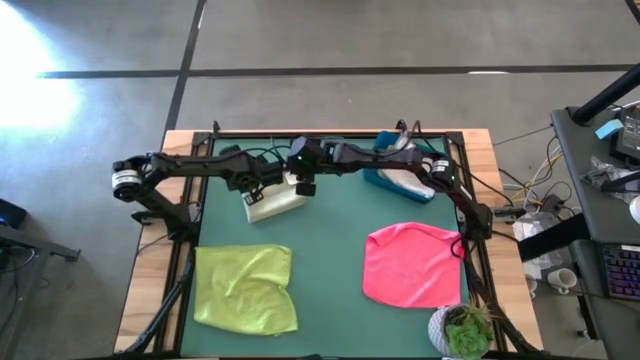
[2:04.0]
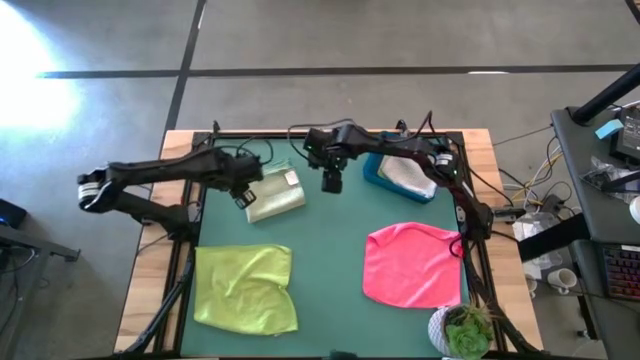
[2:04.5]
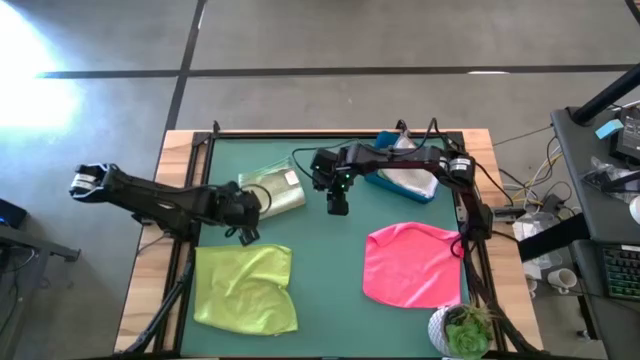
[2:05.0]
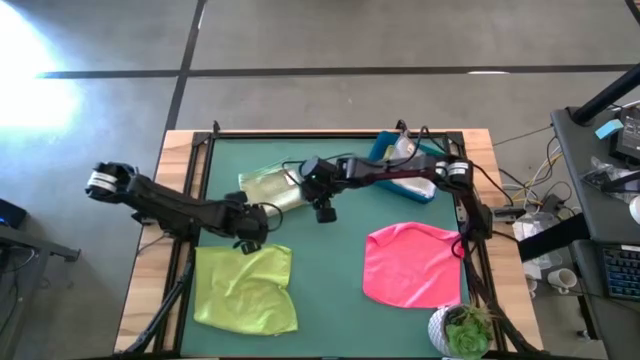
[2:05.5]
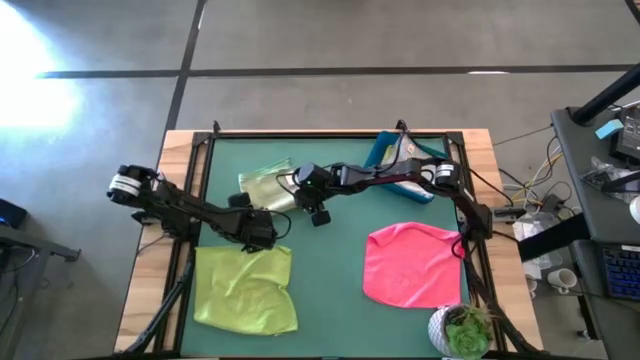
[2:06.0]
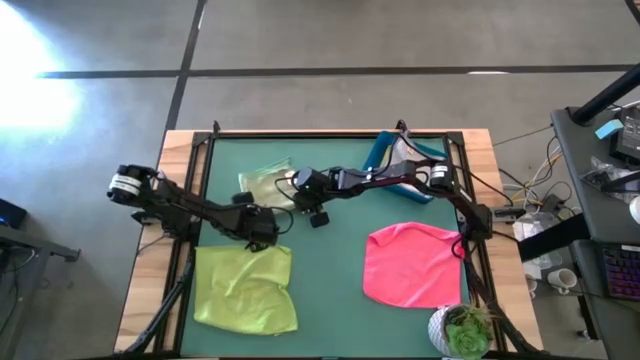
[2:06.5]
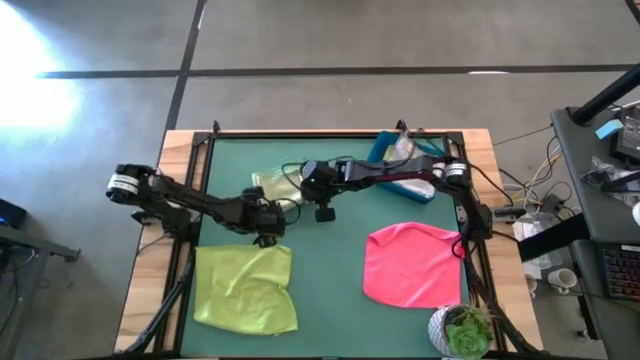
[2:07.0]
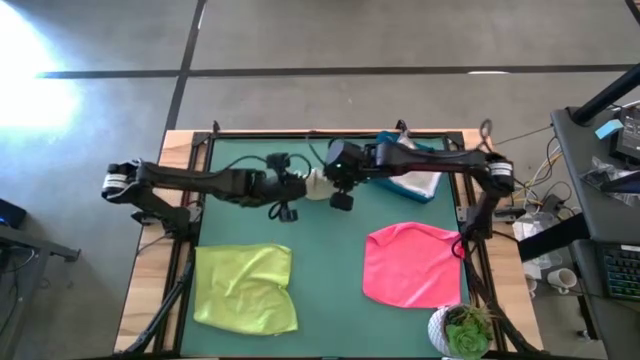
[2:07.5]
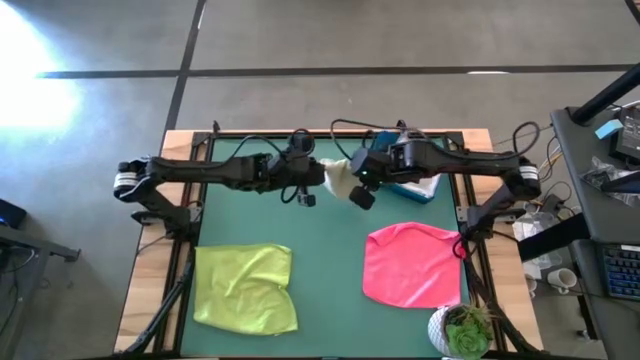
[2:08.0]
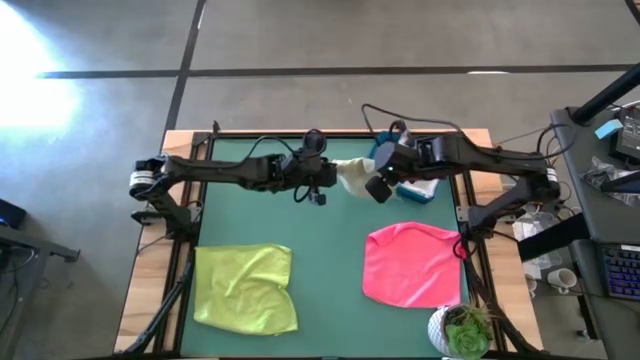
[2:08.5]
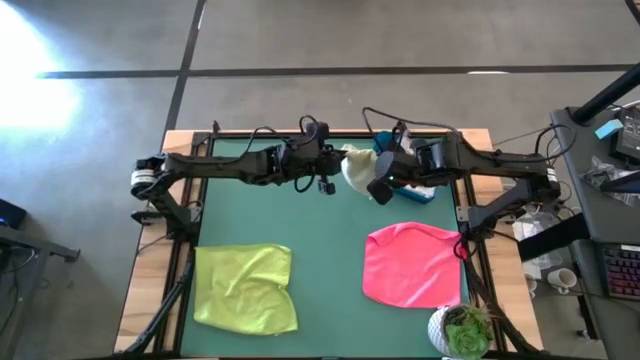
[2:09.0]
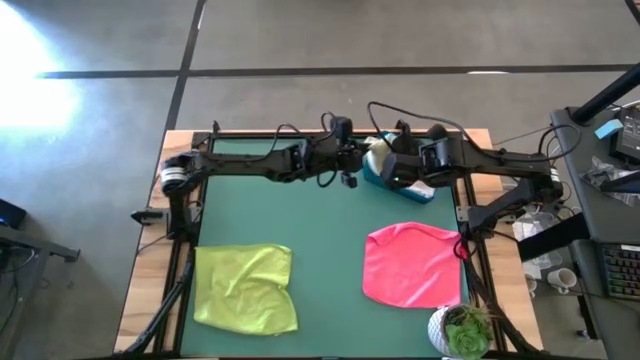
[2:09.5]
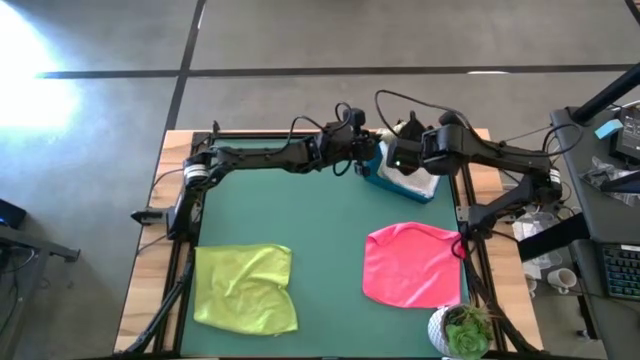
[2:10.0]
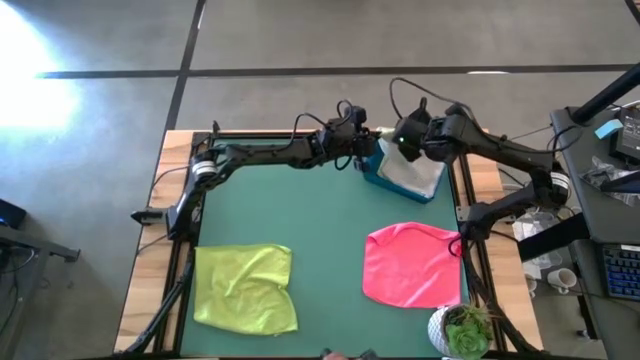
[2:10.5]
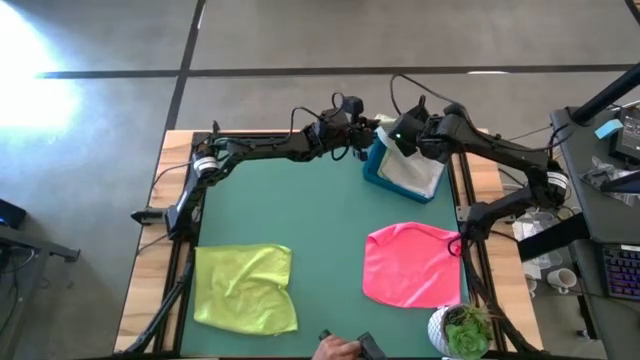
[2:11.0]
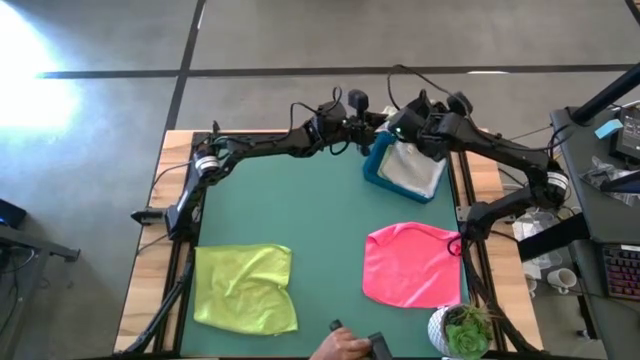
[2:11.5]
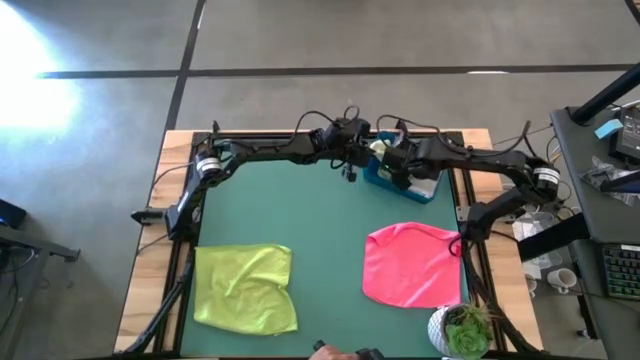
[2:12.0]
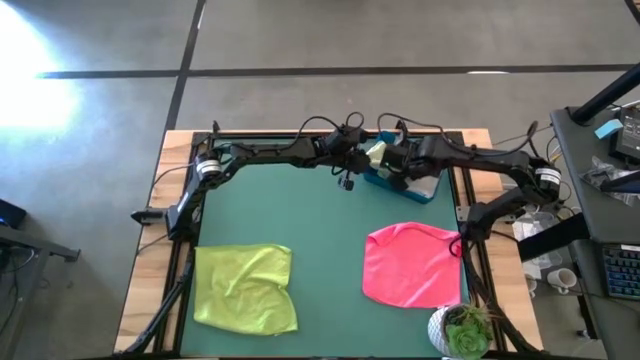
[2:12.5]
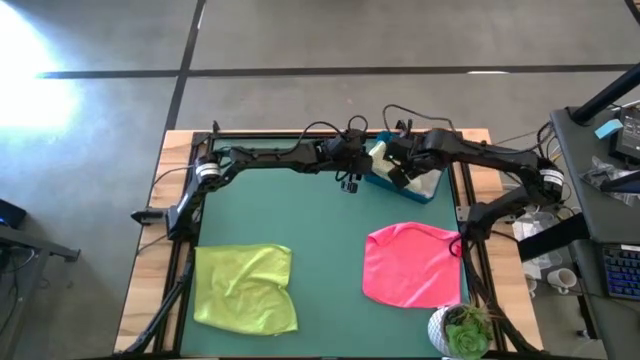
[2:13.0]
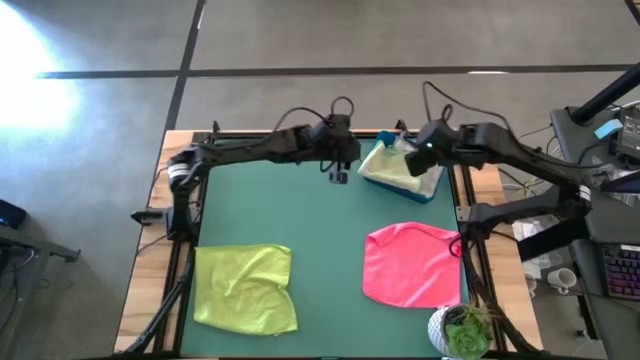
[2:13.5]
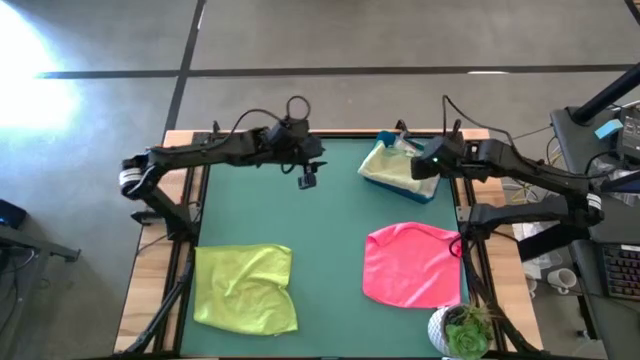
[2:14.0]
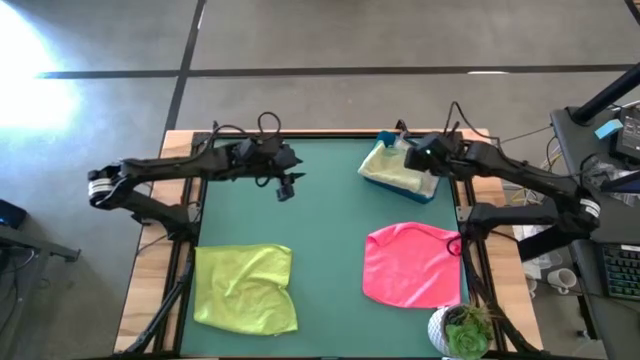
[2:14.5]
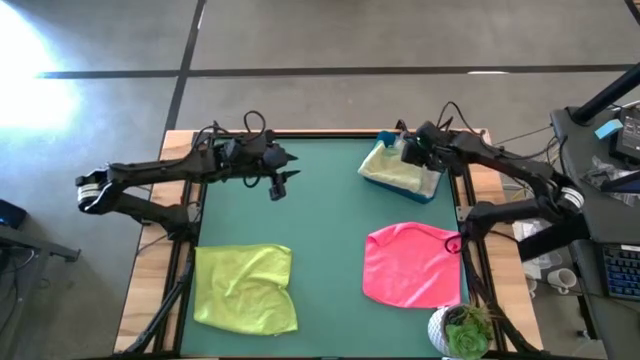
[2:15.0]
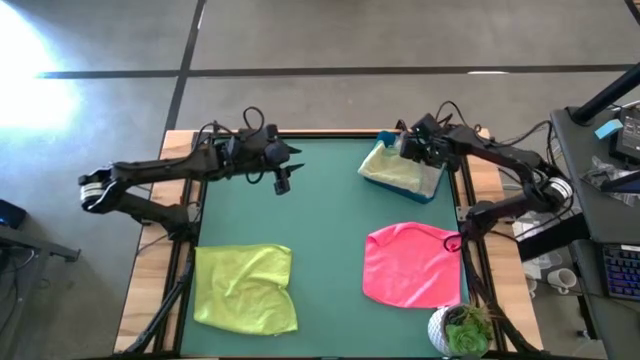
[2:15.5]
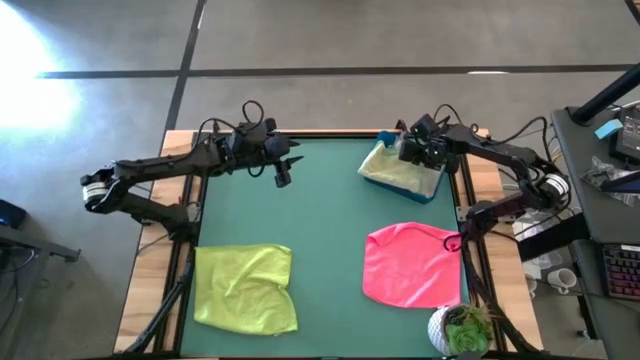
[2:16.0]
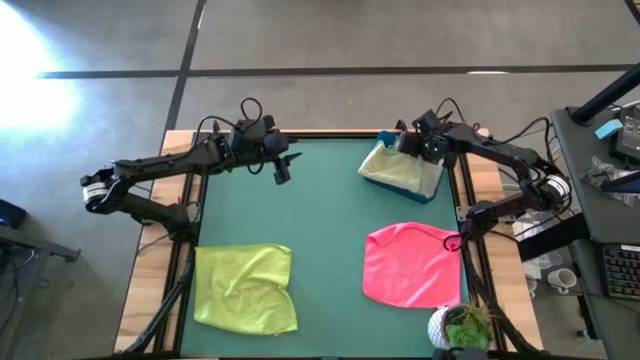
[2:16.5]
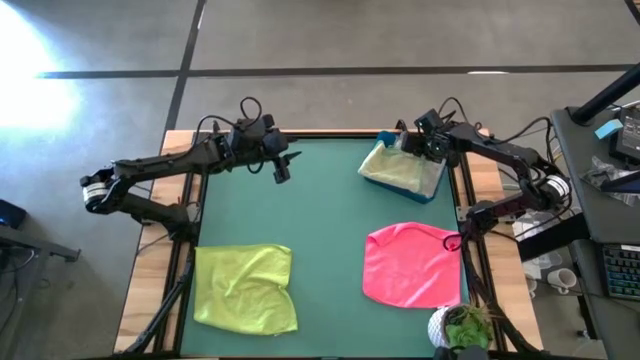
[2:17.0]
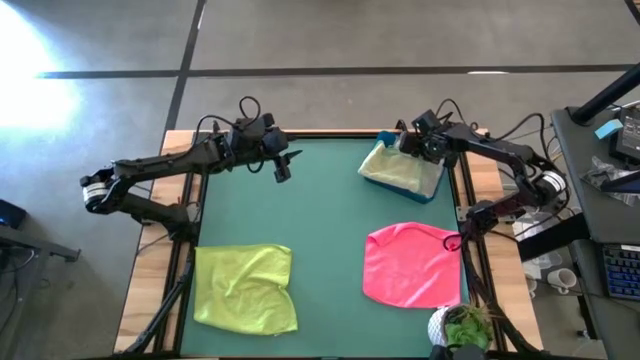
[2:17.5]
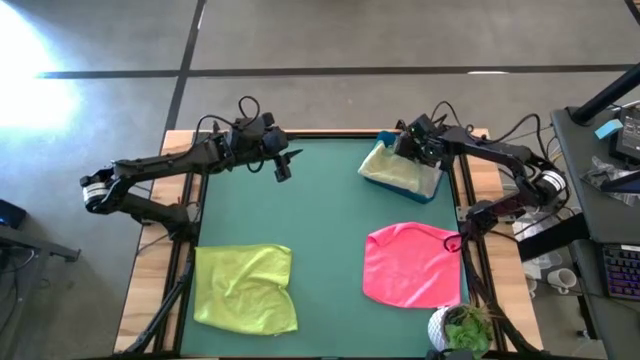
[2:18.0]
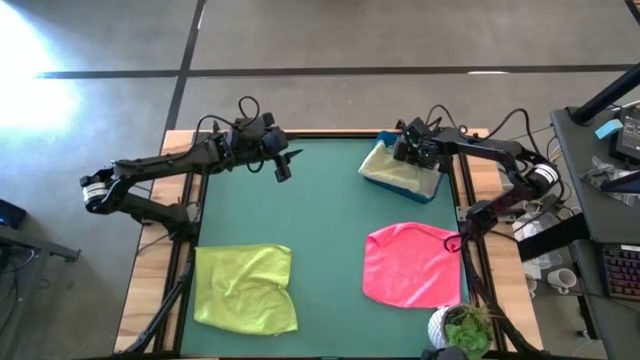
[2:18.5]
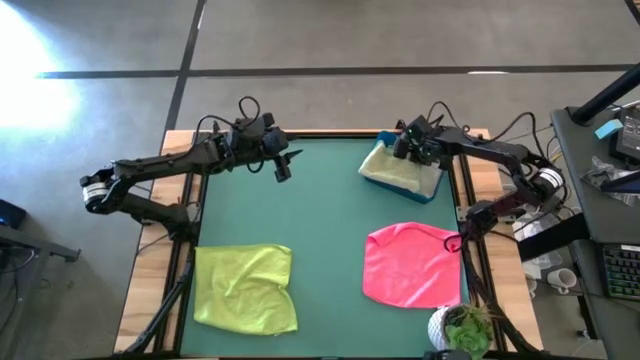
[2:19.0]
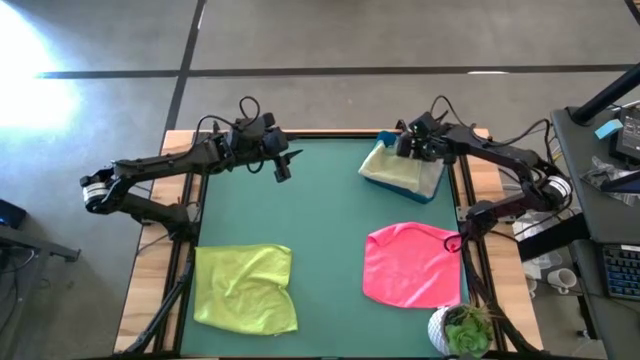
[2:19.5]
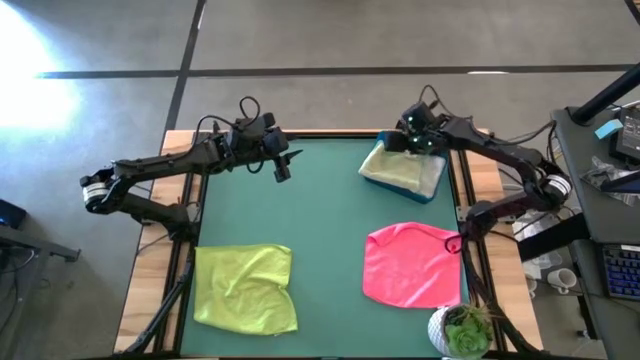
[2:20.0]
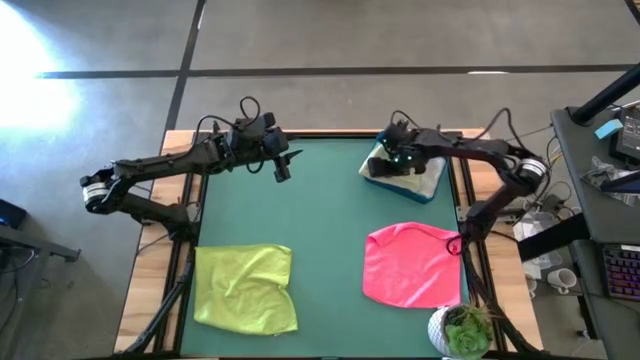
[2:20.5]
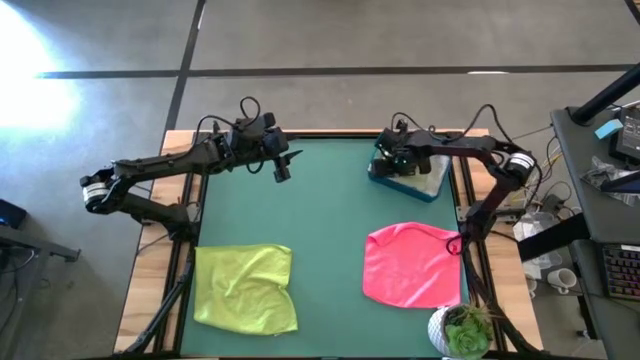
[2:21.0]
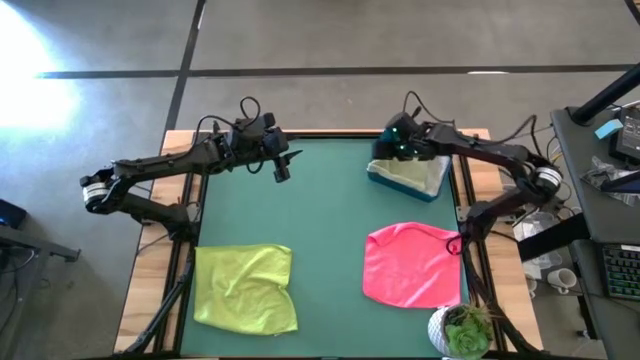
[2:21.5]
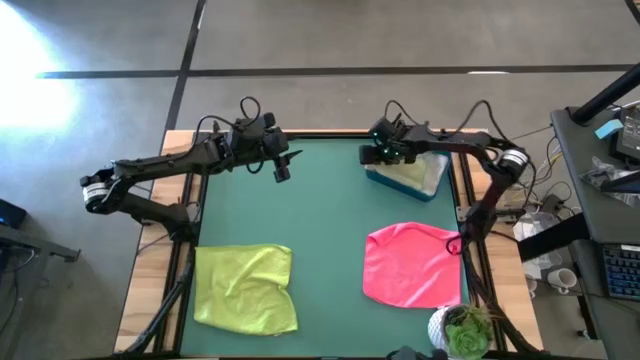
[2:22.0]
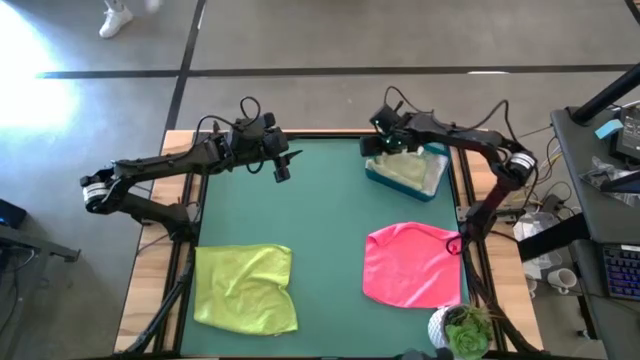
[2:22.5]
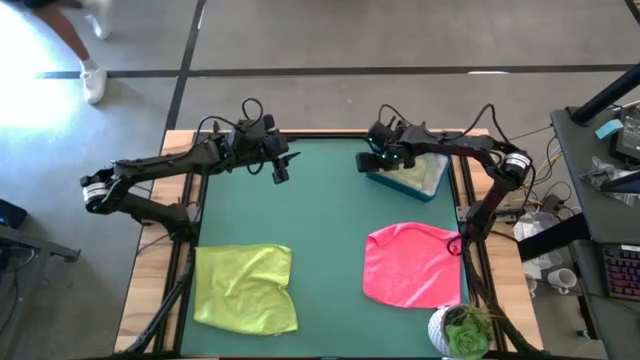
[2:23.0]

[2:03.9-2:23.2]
Task: Fold microfiber towels
Put the folded light green microfiber cloth into the blue bin

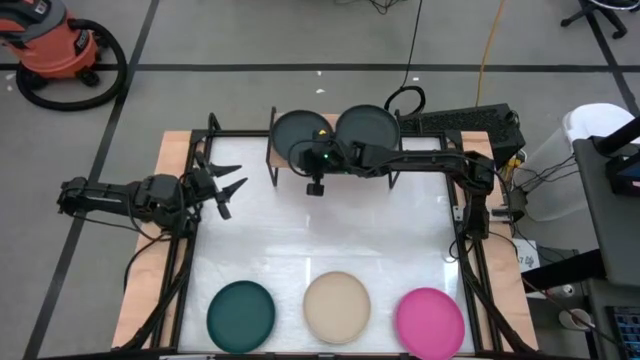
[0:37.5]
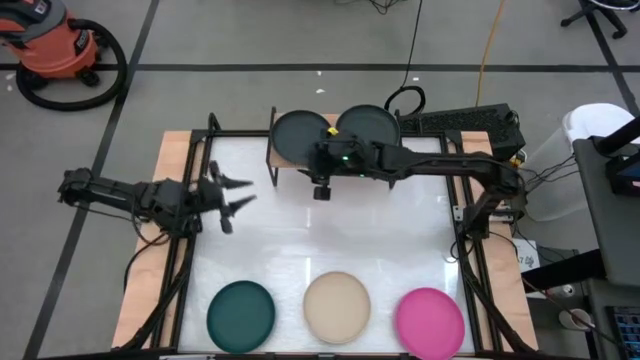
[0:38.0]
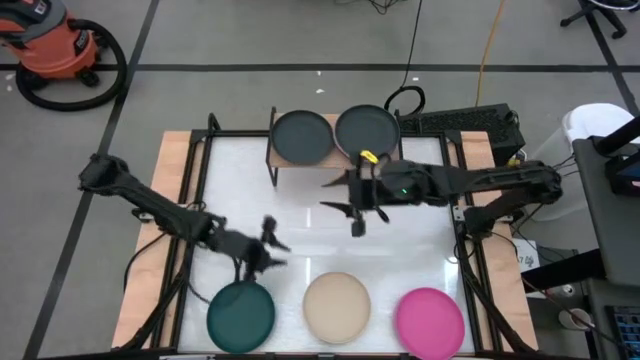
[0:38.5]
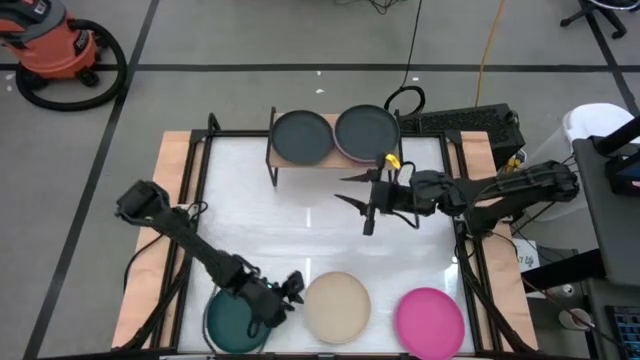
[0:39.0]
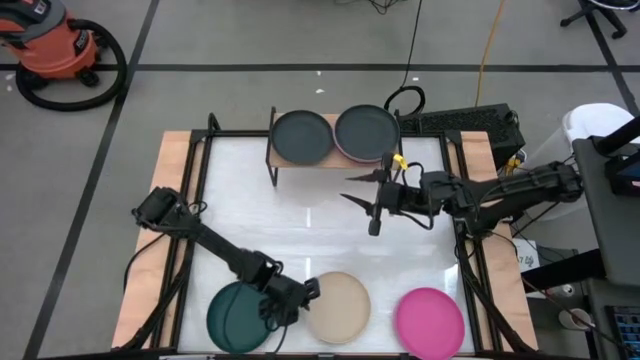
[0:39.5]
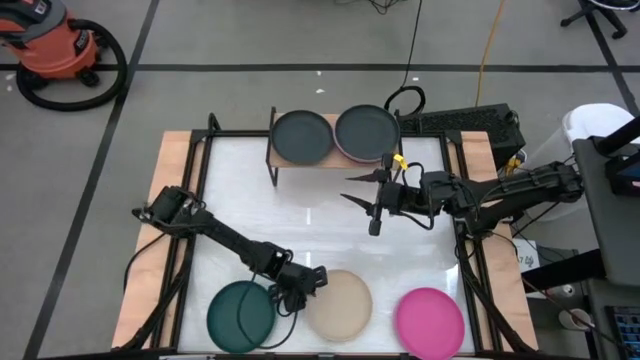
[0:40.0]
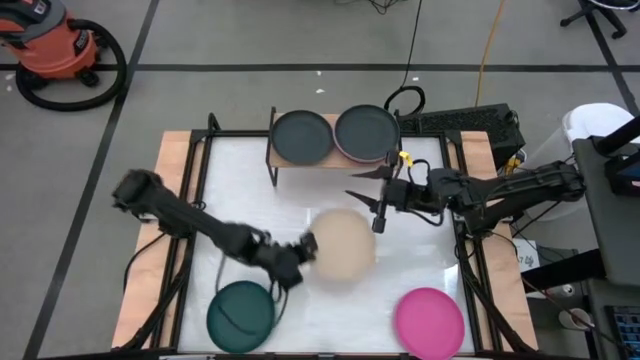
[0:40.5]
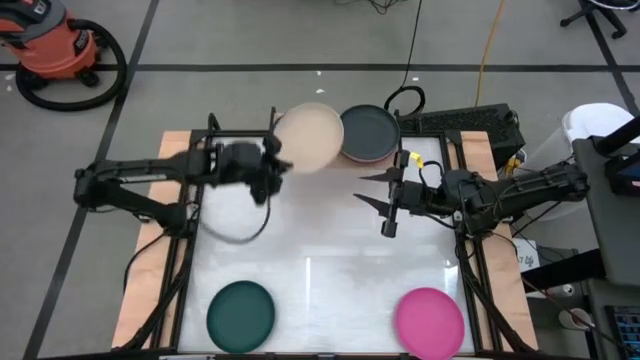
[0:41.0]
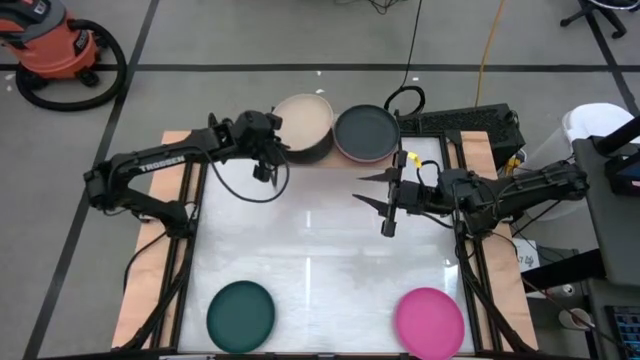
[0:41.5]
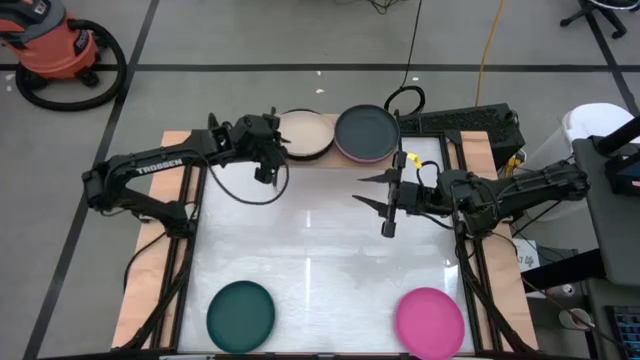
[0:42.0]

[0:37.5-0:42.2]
Task: Place and stack plates onto a shelf
Stack the light brown plate on top of the black plate on the shelf
